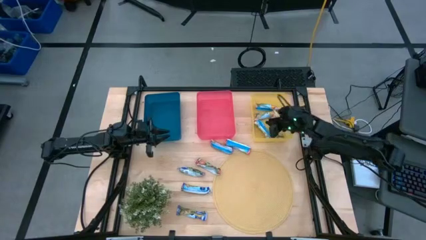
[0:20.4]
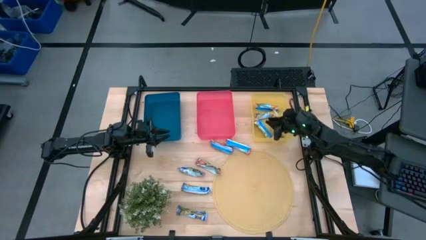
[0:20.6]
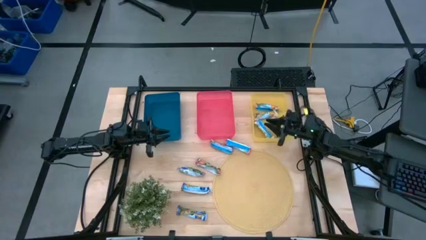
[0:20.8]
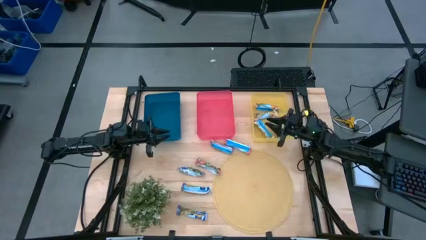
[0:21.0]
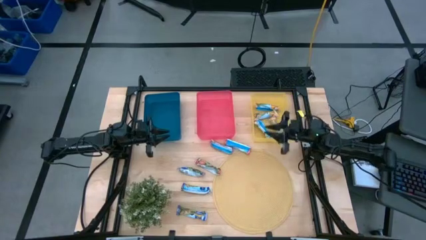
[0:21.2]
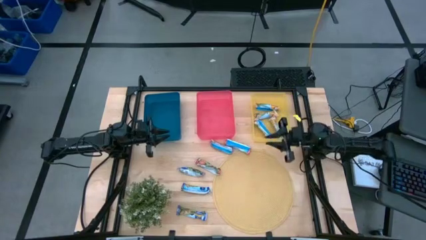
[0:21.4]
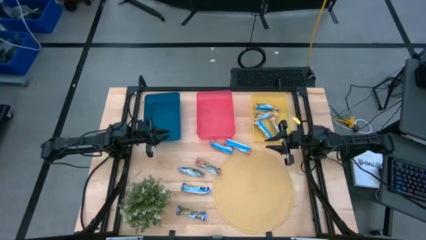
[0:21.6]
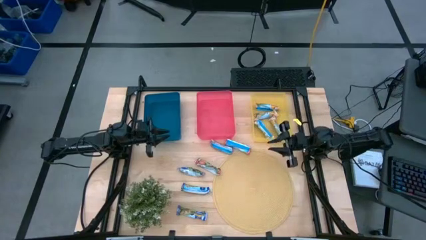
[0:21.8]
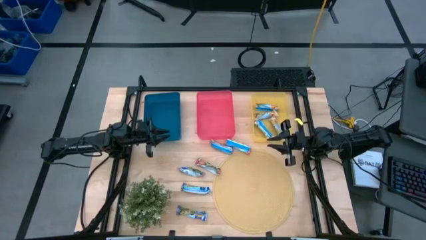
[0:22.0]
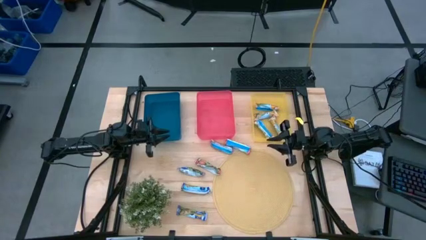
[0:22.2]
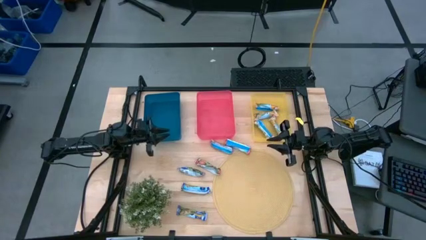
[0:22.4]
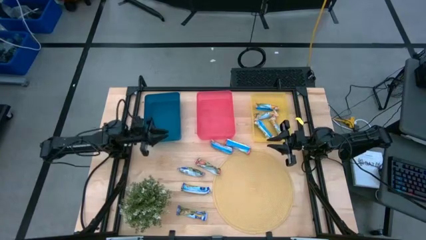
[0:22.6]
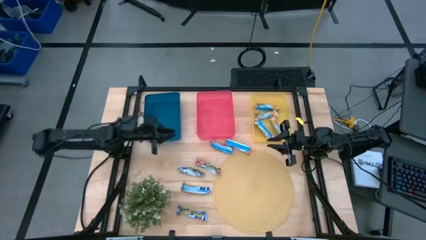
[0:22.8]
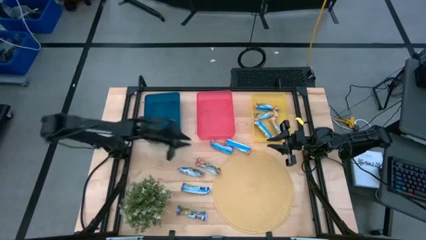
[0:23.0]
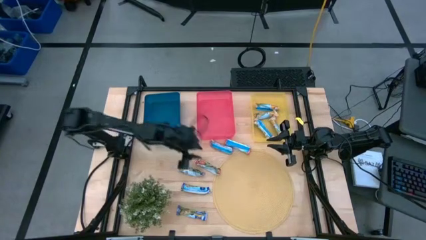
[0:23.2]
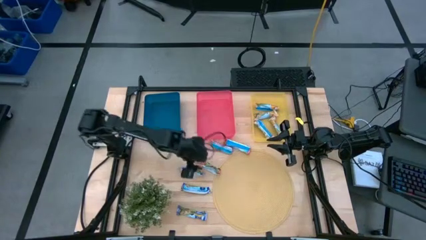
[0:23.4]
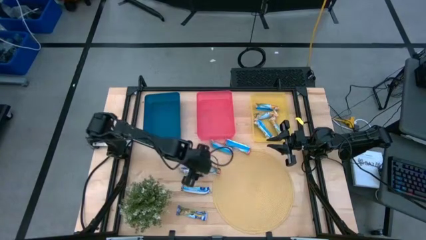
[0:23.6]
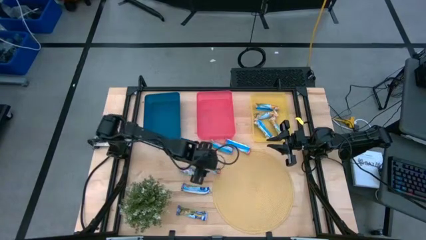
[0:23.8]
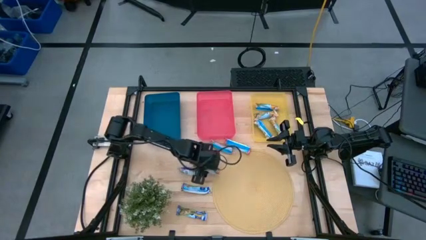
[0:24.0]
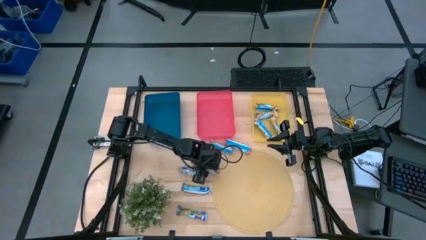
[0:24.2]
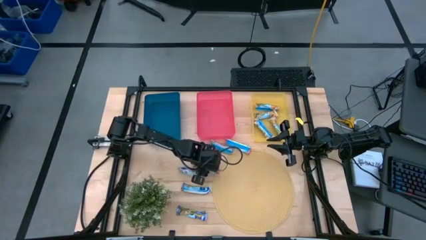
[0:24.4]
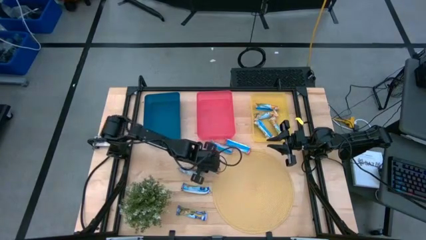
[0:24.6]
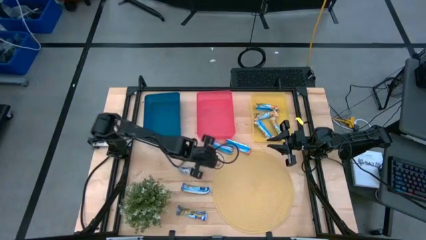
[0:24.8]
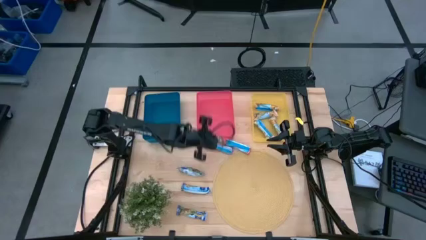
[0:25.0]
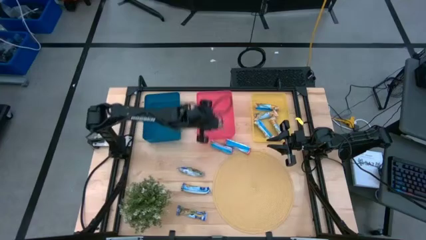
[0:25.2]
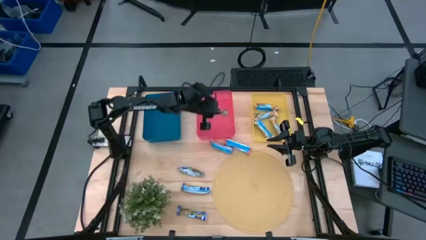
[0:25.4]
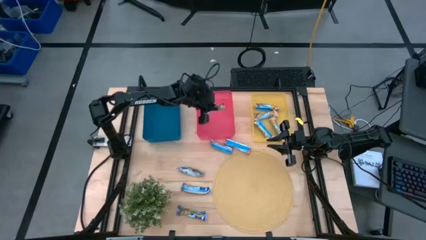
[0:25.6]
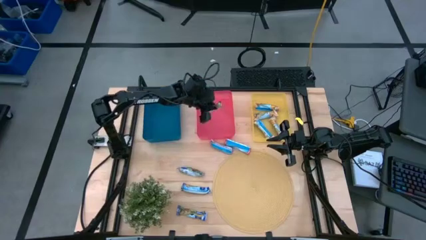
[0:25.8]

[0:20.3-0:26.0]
Task: Pick and place Granola Bars by type
Put the red granola bar into the pink bin

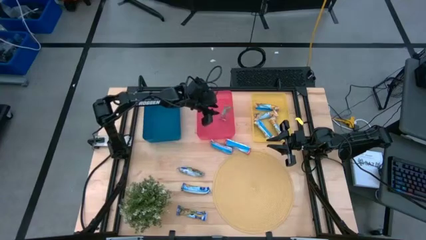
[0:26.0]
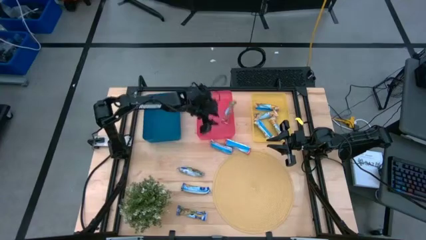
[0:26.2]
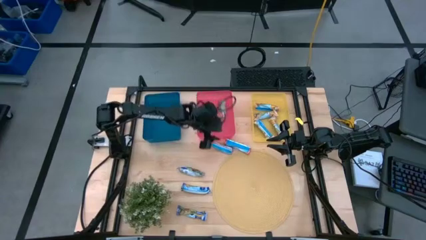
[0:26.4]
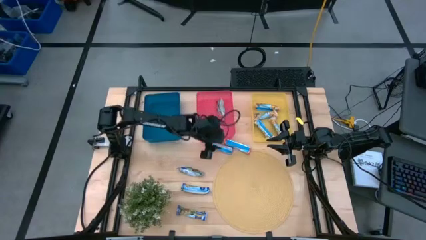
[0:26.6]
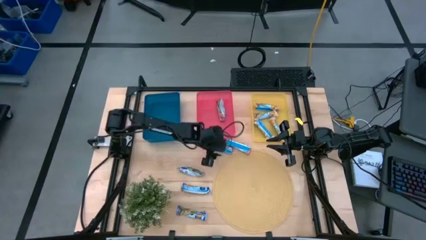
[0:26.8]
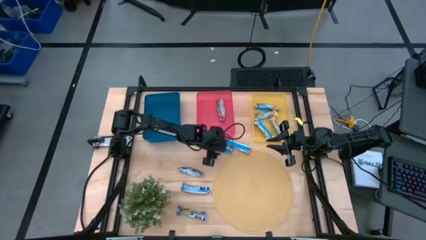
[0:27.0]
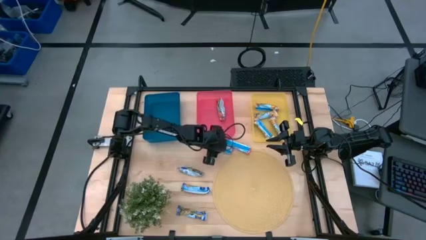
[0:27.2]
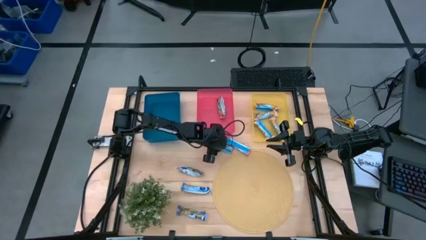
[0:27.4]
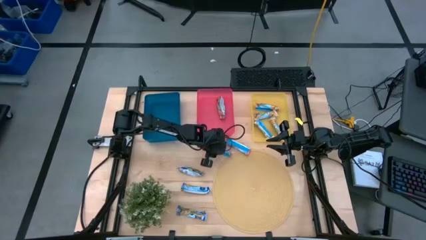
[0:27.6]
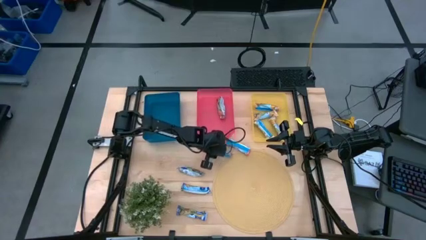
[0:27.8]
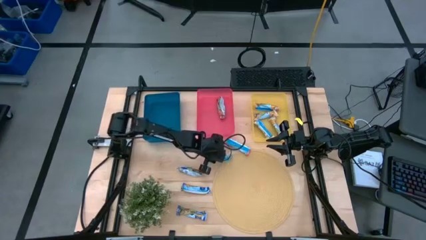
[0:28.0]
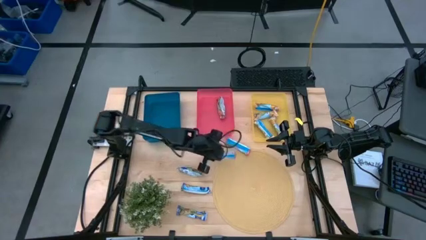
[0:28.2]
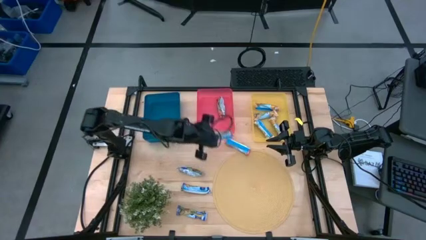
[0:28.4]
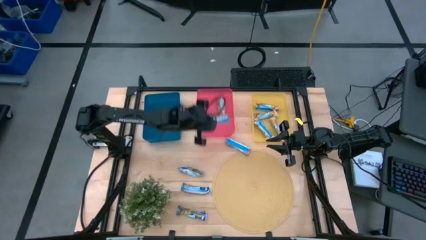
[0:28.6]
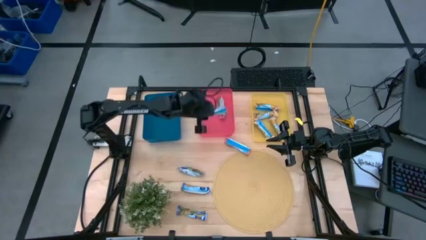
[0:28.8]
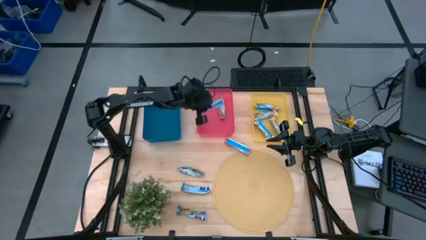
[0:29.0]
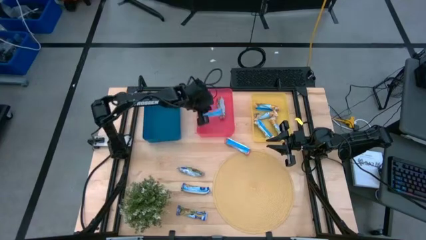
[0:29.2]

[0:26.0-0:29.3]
Put the red granola bar into the pink bin

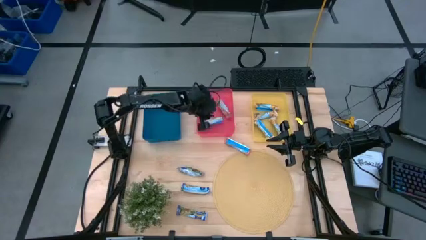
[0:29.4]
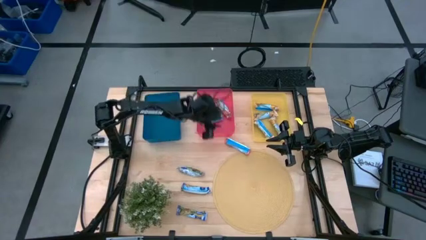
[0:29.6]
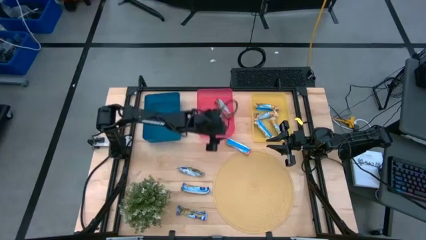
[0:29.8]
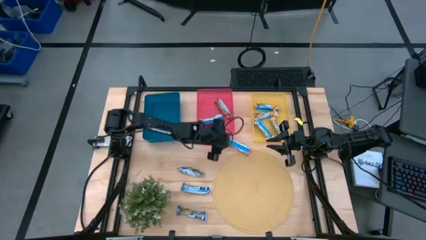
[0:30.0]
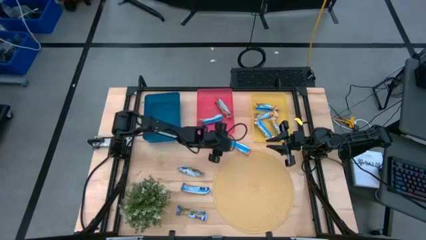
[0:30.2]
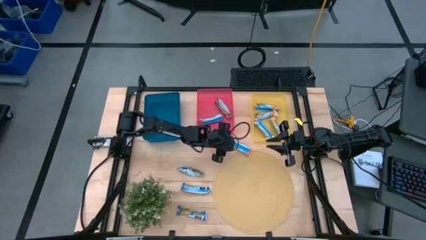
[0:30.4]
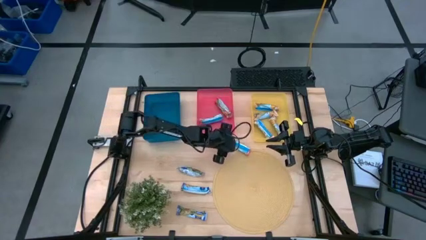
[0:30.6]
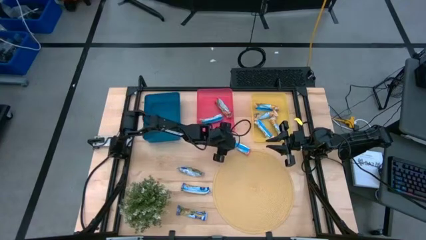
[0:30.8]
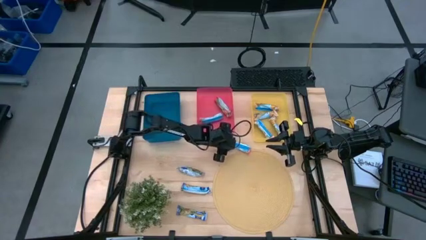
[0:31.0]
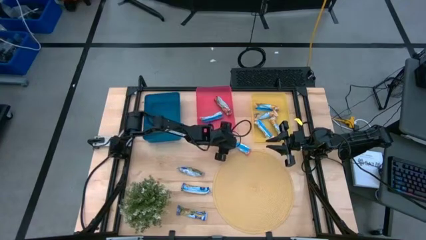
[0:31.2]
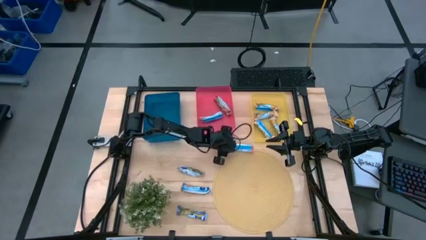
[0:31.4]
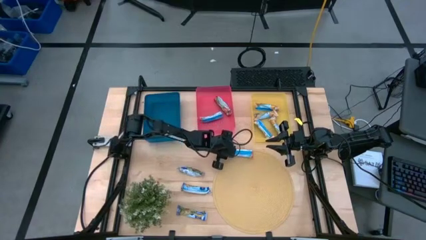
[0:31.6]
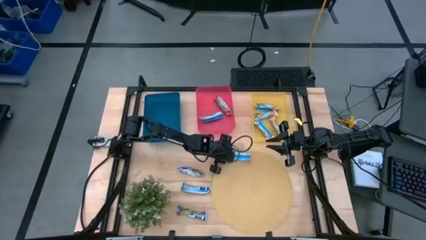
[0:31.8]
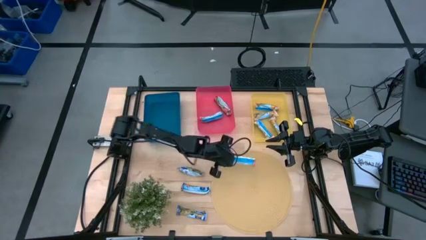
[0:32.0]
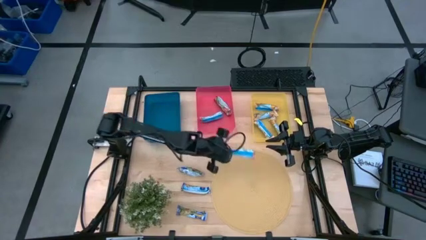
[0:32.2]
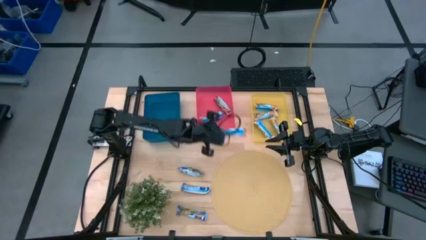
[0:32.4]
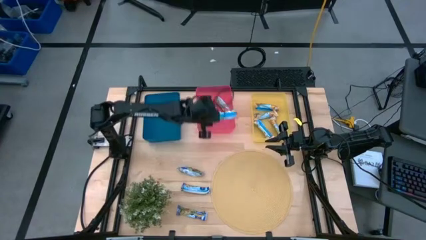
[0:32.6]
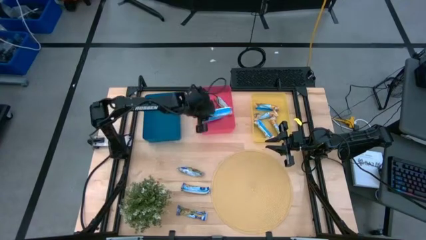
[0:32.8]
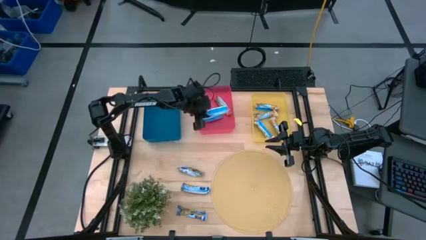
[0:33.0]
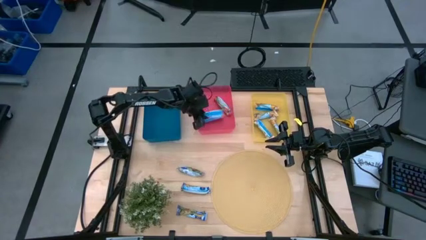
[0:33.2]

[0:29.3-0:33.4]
Put the red granola bar into the pink bin

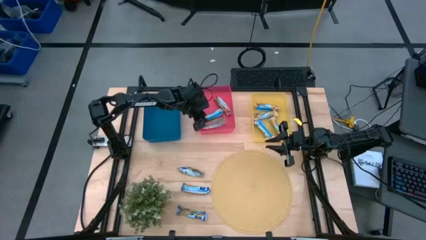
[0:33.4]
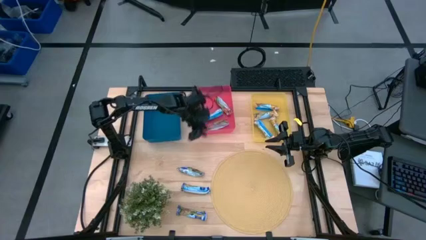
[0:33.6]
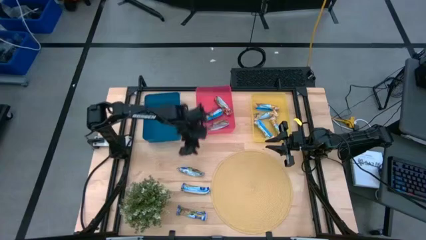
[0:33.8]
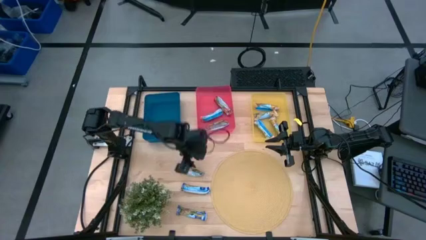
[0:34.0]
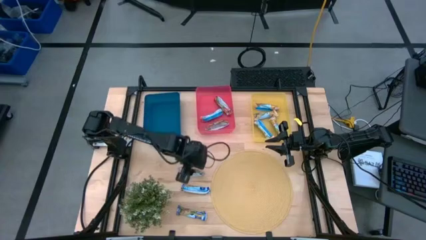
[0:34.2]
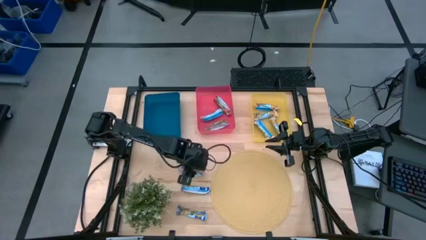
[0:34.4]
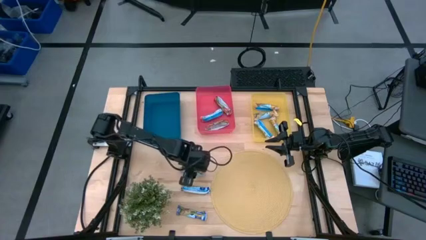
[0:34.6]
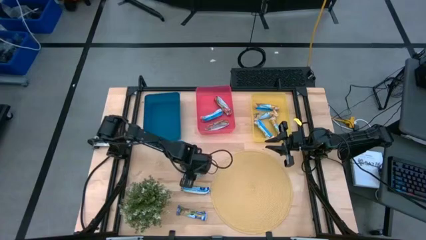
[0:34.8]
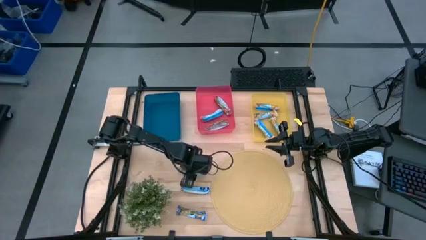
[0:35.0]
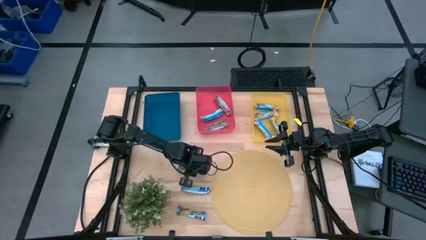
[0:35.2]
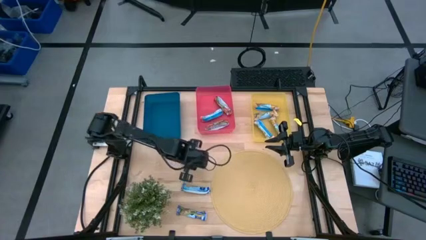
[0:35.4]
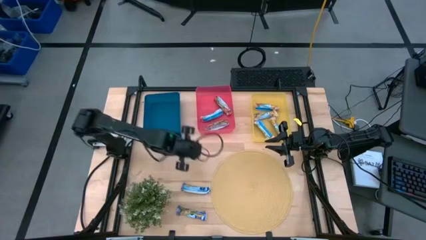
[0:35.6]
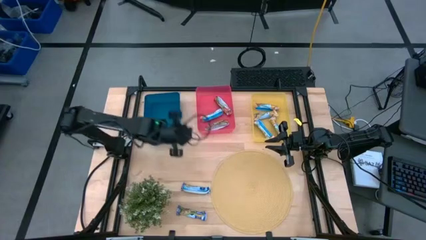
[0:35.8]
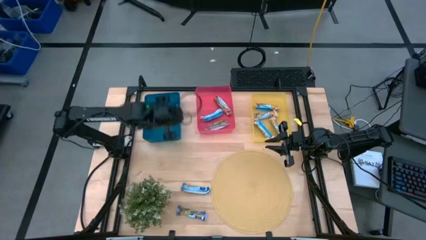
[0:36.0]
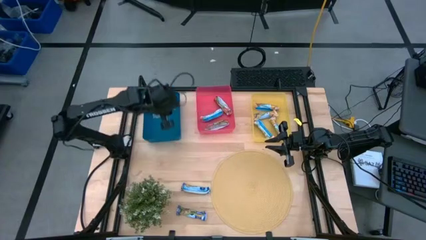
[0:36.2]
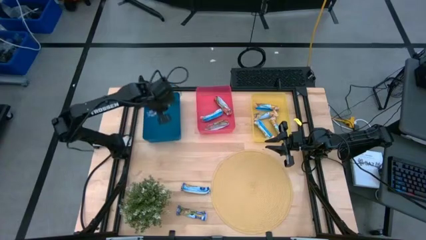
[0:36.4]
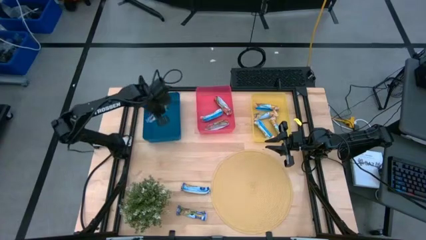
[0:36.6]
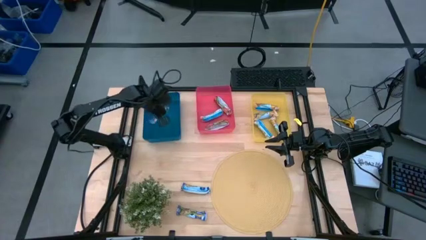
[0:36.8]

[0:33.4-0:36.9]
Put the blue granola bar into the blue bin
